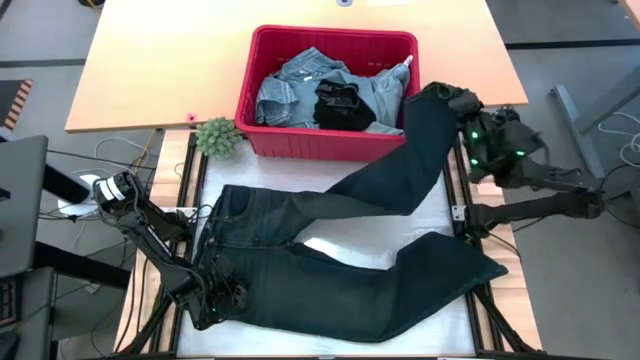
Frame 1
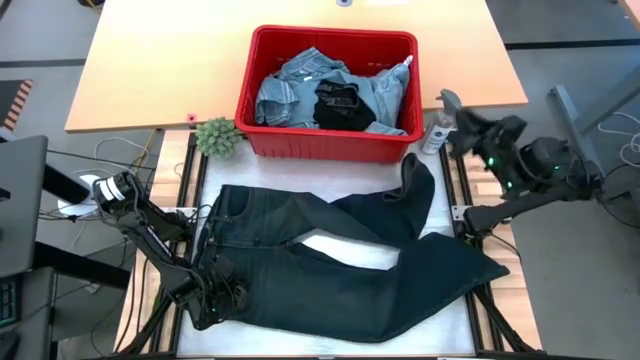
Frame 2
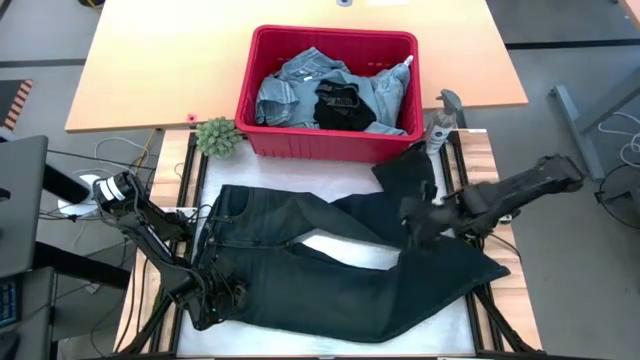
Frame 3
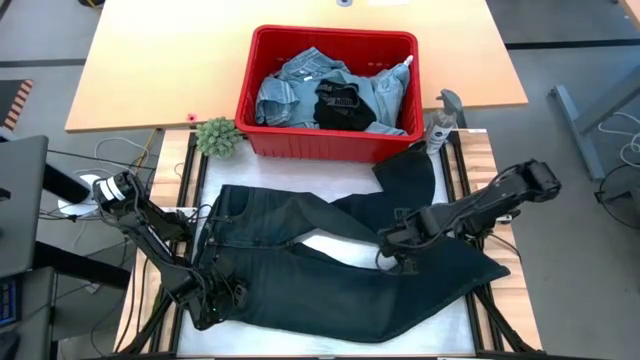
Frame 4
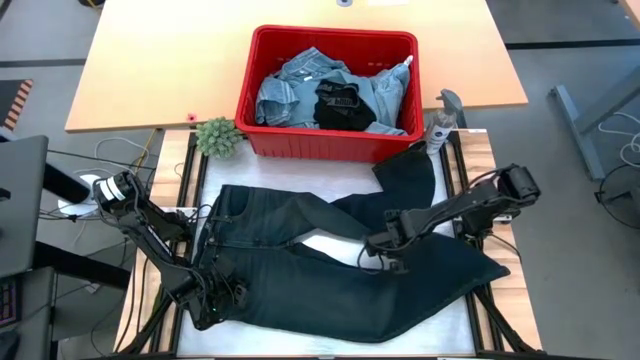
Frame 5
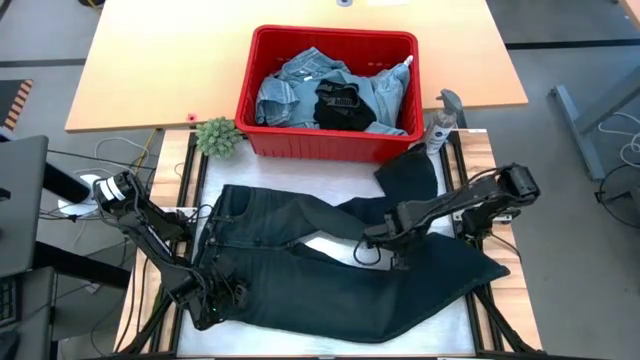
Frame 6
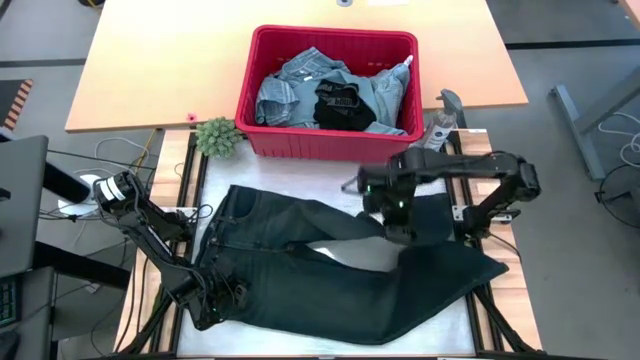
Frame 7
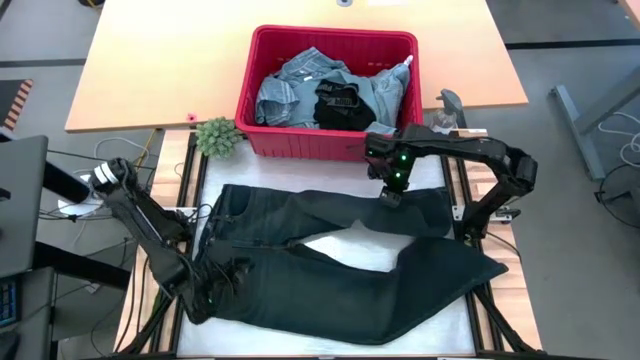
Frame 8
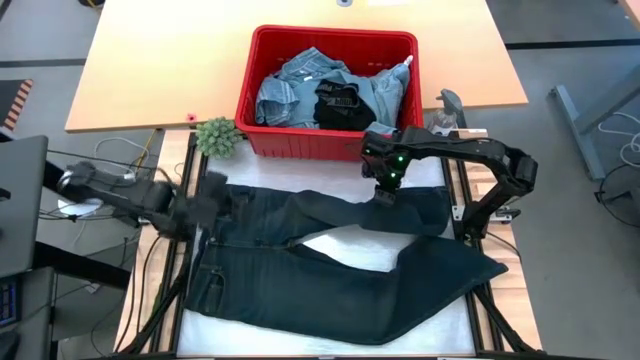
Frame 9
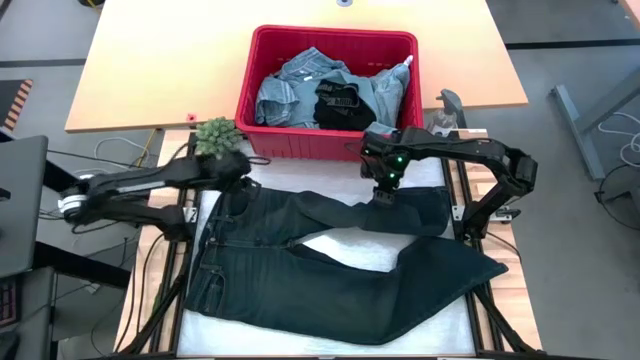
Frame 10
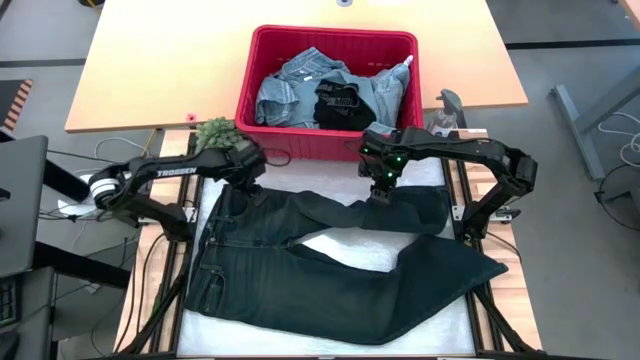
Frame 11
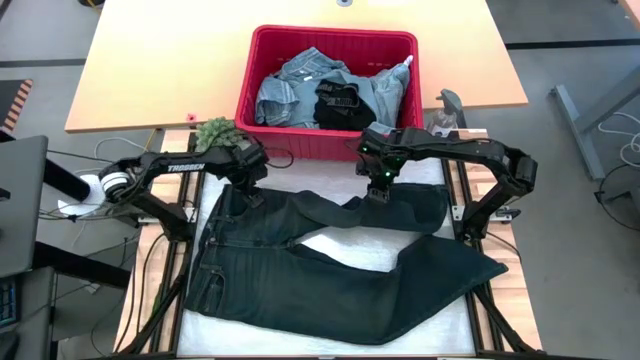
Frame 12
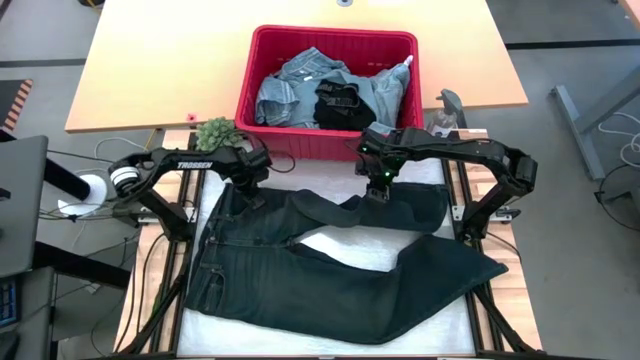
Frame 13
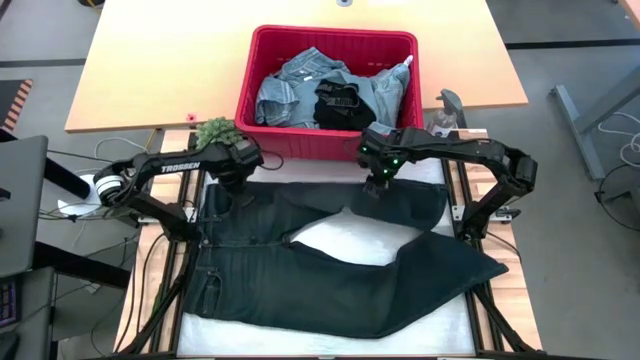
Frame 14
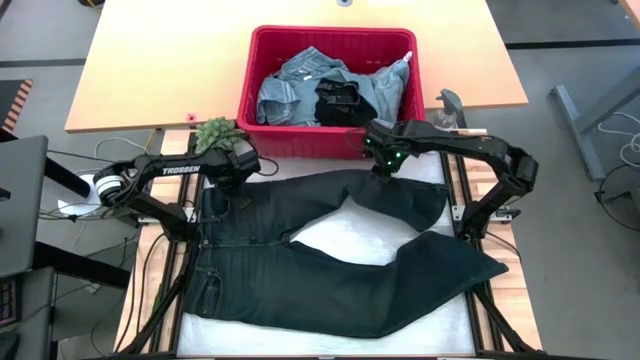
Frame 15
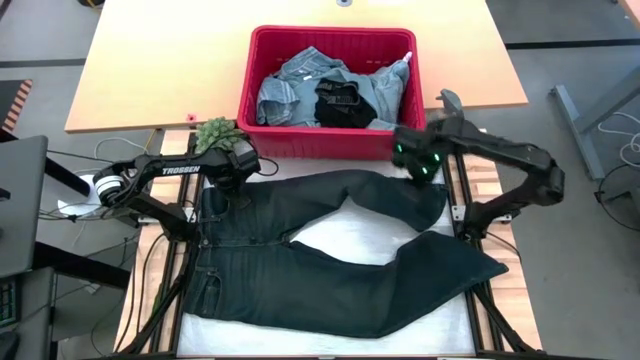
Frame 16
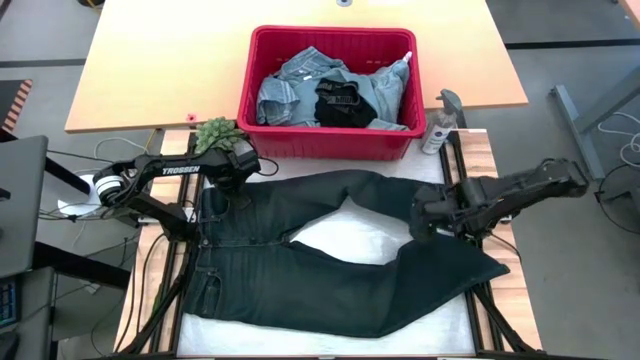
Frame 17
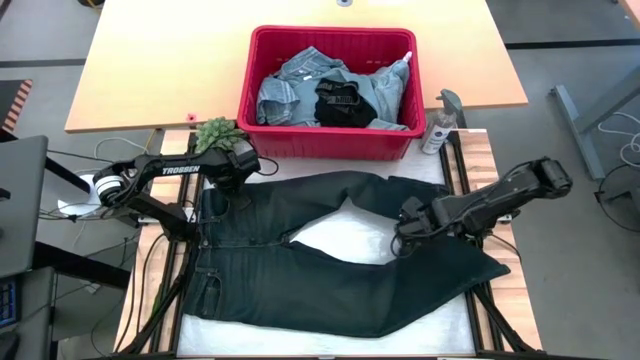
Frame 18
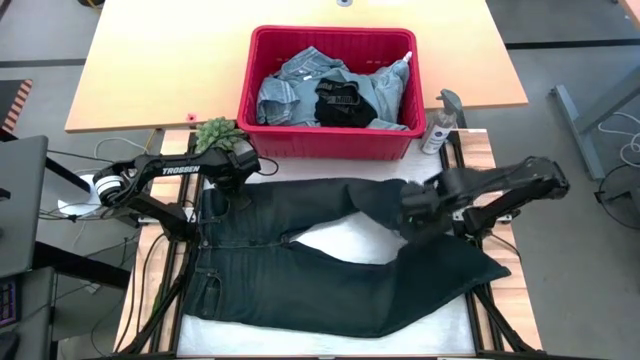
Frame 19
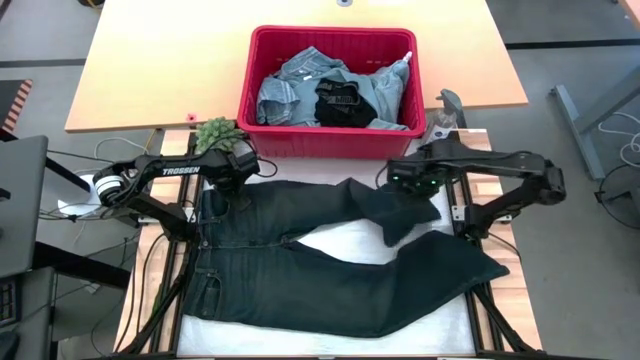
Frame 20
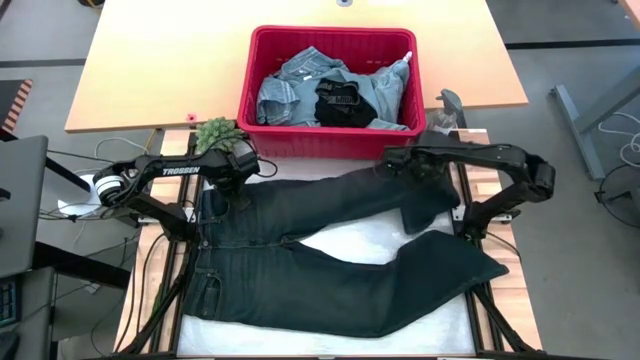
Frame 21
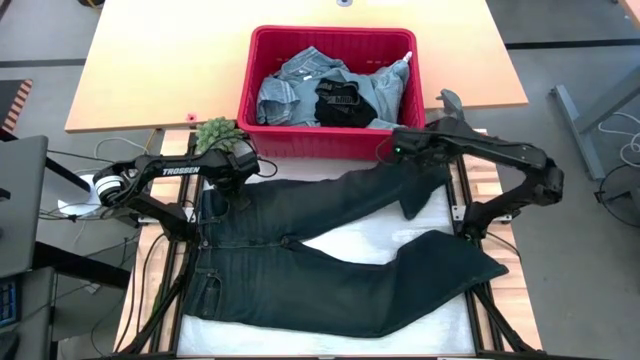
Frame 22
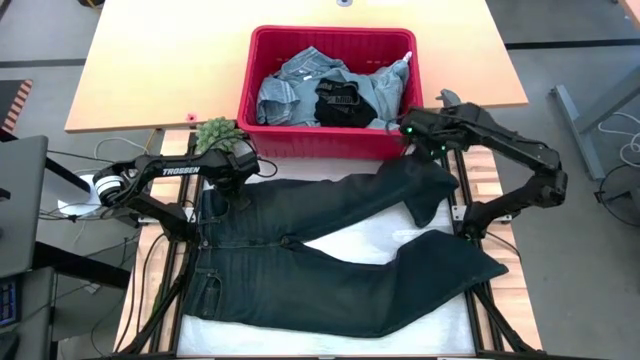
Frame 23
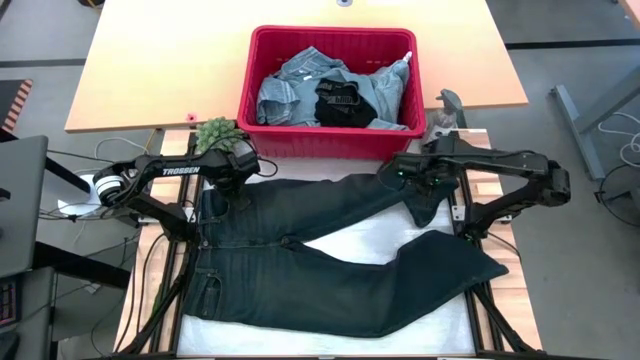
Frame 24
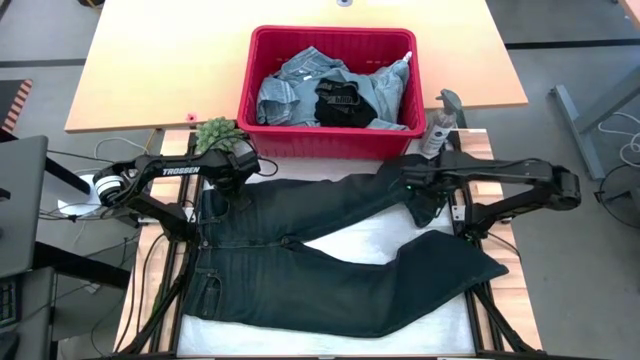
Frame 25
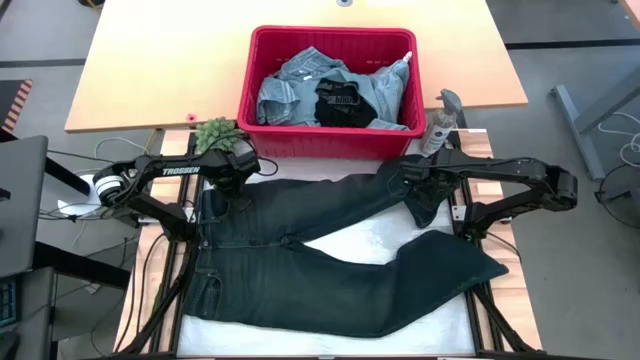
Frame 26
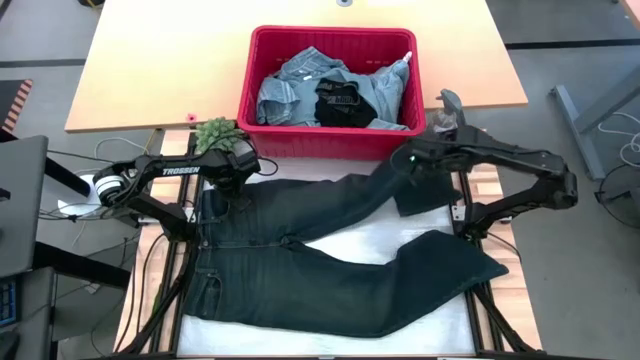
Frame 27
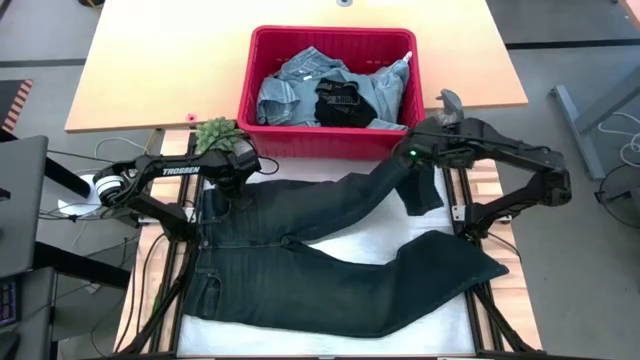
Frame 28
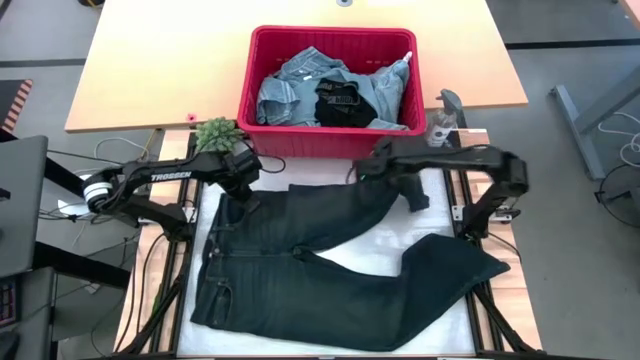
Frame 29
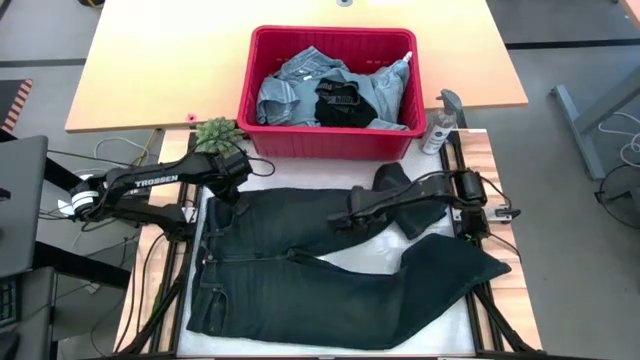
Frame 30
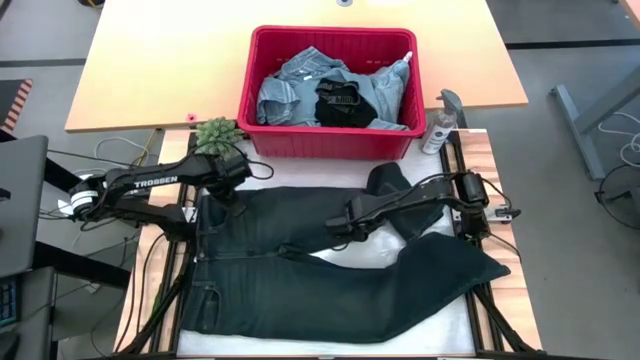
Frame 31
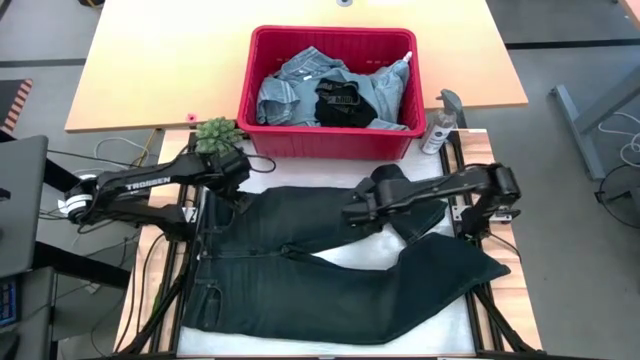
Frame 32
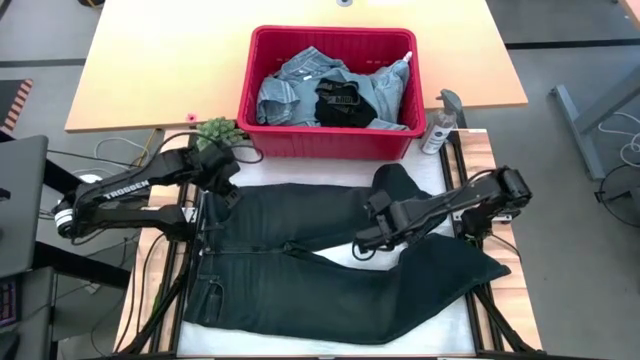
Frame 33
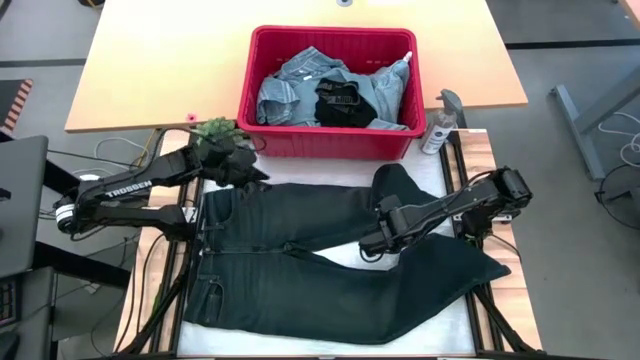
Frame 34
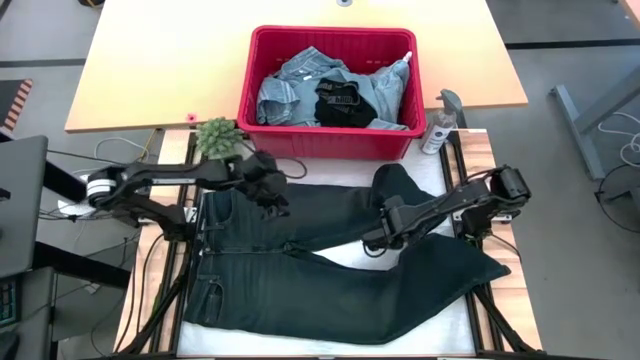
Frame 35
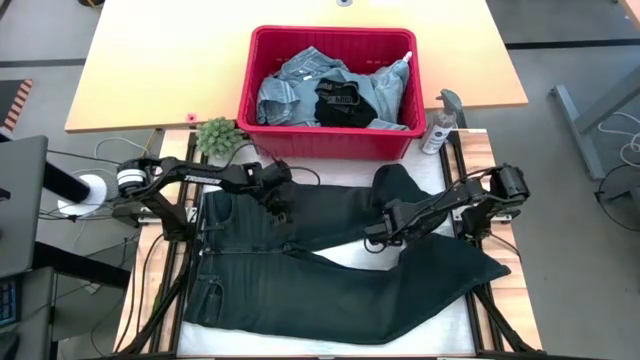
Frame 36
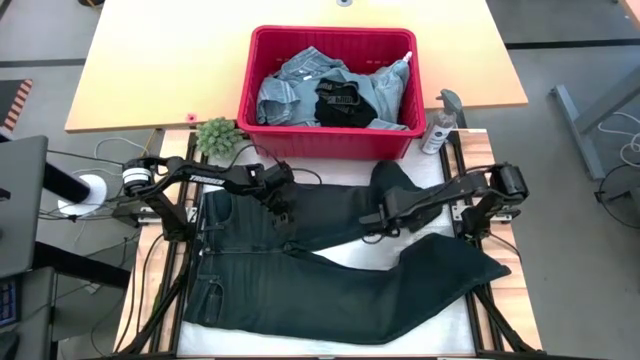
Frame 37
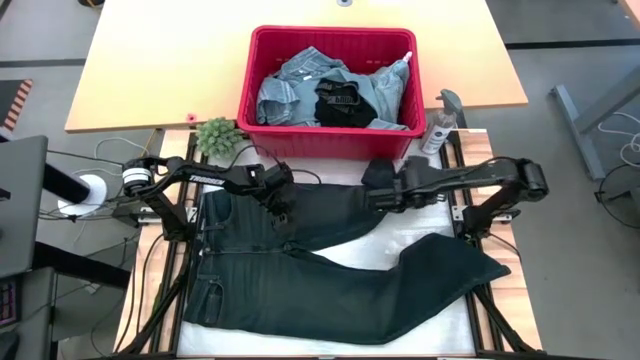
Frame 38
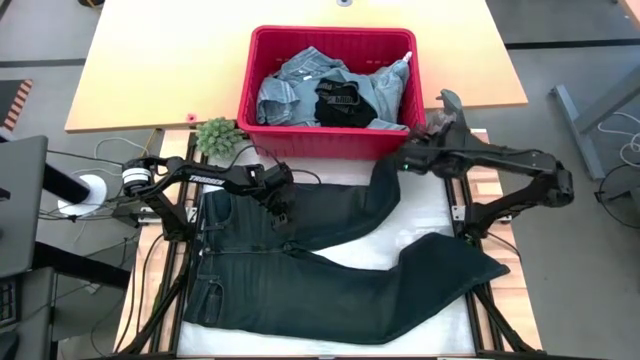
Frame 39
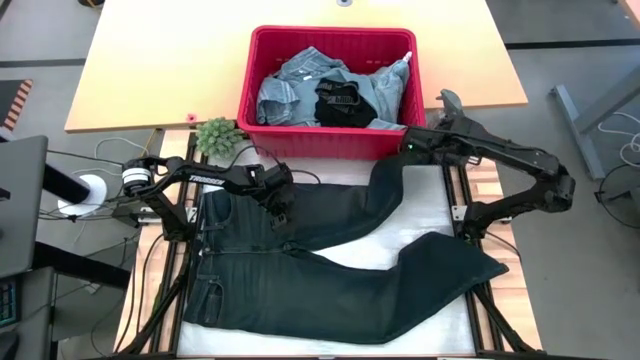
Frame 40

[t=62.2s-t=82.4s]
Task: Fold Laundry from Bin
Fold the black pants
